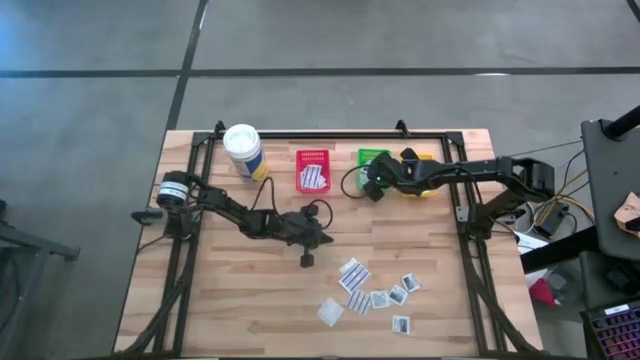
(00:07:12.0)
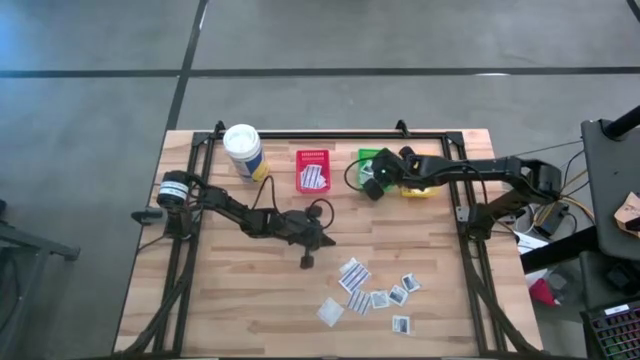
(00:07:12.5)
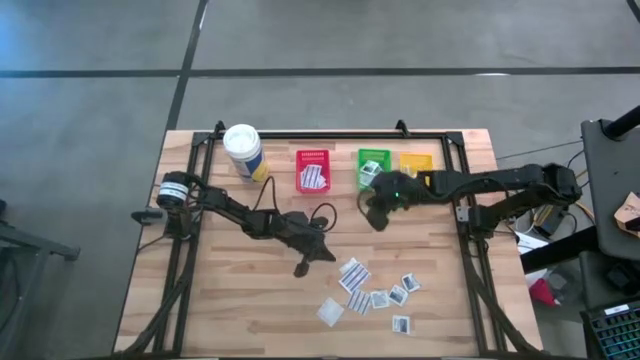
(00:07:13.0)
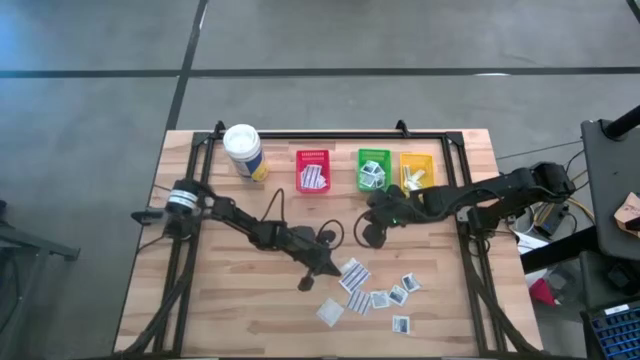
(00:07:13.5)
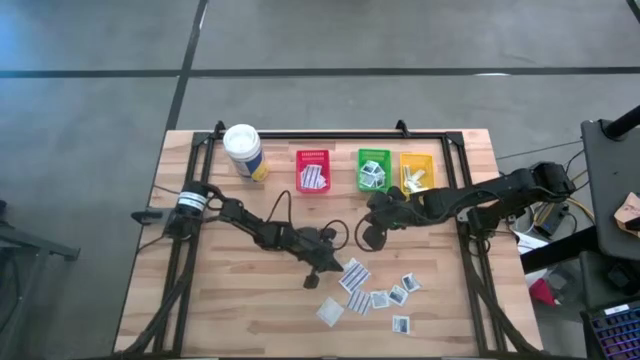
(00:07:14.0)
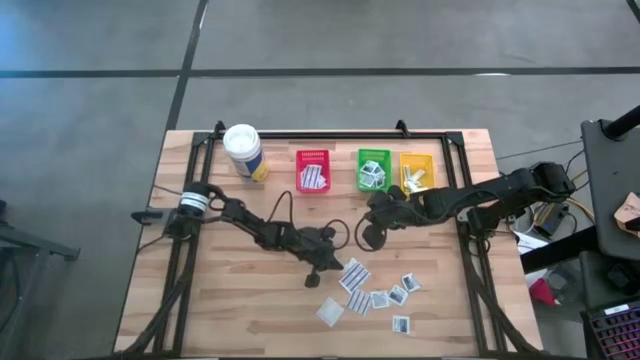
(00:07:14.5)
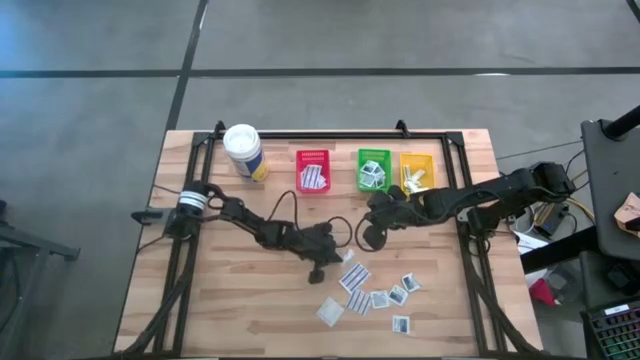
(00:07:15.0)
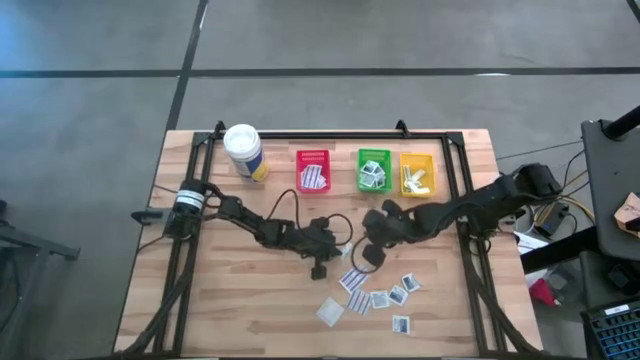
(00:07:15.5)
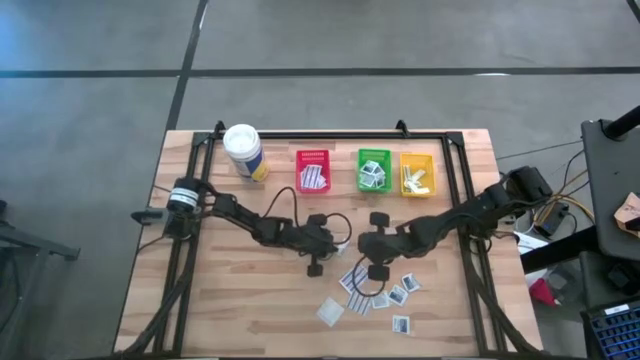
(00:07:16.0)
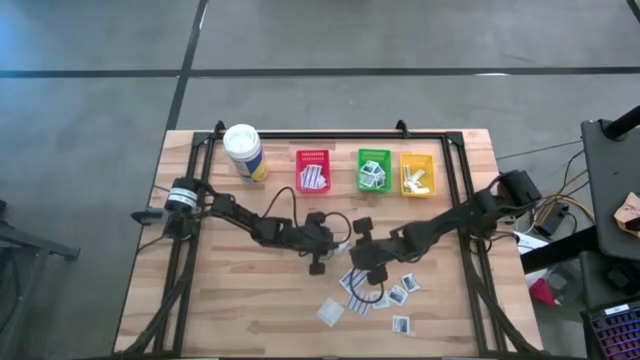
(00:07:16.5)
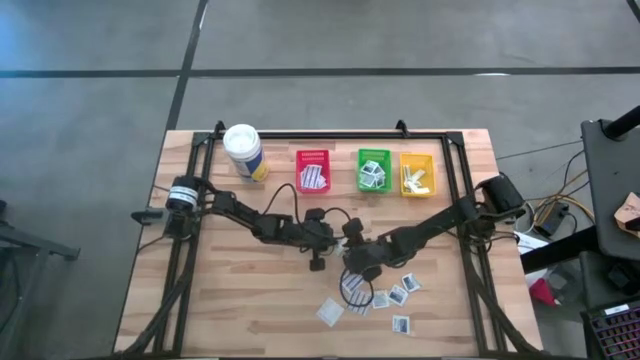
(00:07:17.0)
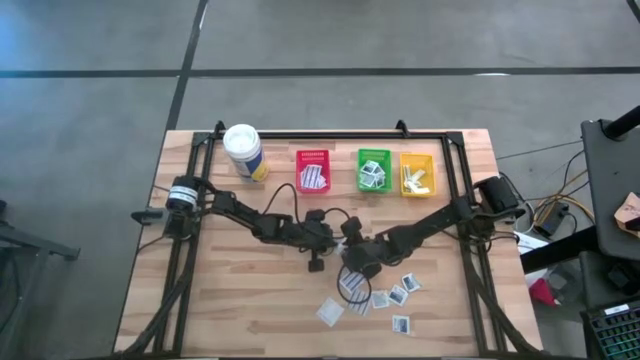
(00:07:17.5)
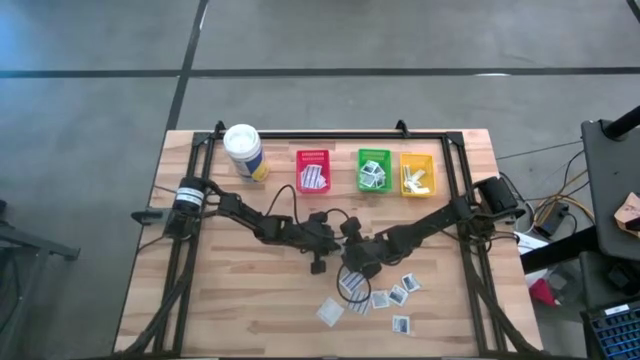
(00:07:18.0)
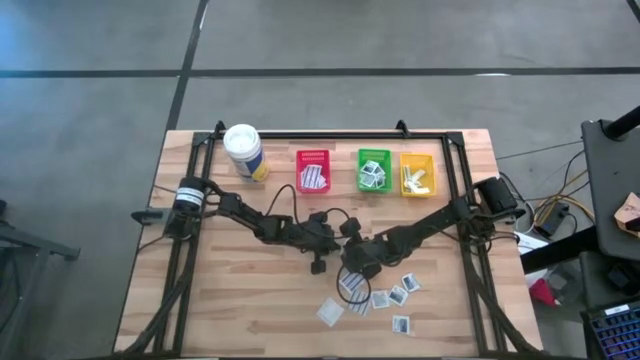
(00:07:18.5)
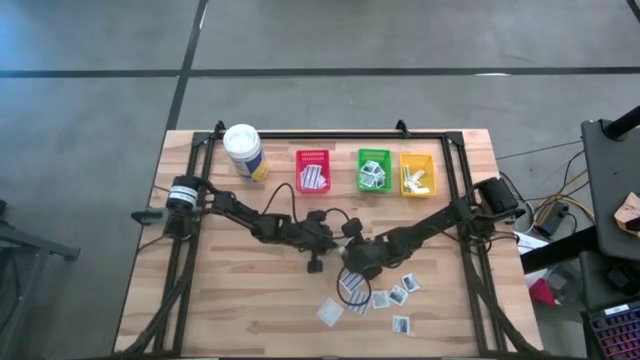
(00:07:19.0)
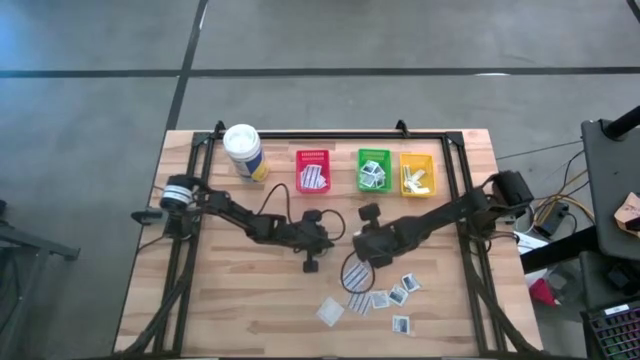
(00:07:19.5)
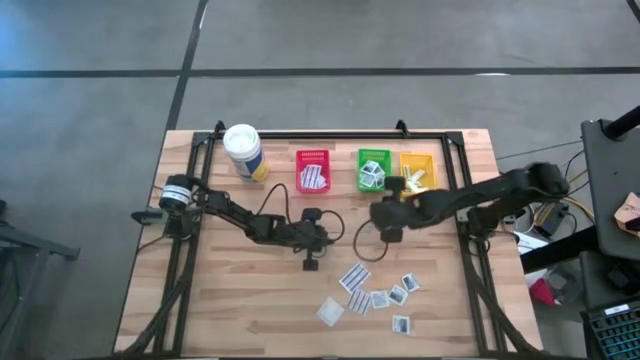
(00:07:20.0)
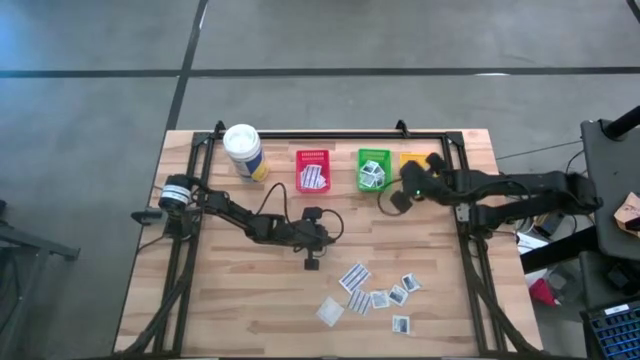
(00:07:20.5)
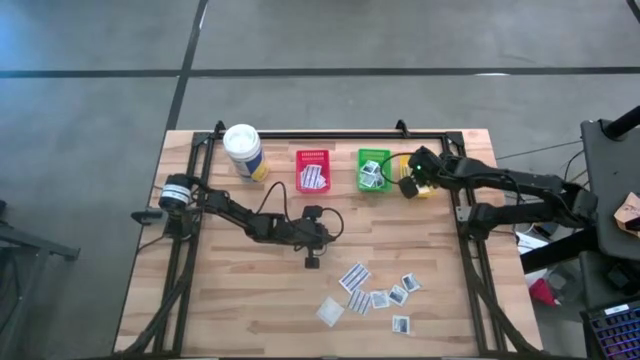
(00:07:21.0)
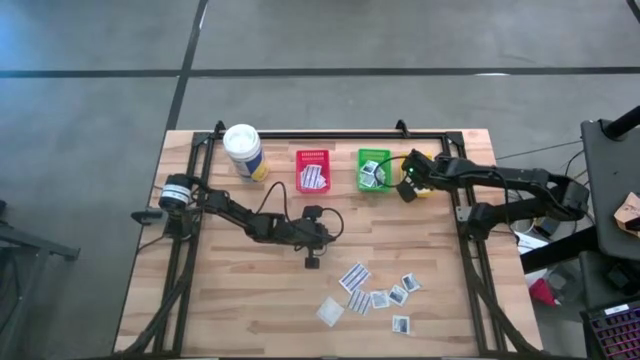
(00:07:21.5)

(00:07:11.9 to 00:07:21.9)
Task: Pick & Place First Aid Supplies
Put the green bandage in the yellow bin

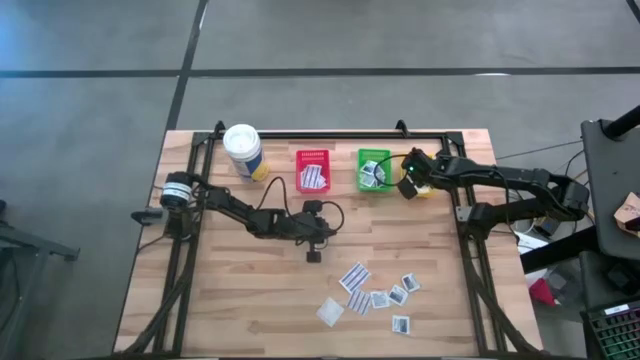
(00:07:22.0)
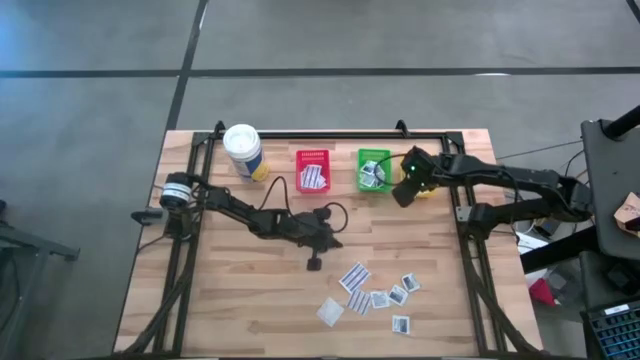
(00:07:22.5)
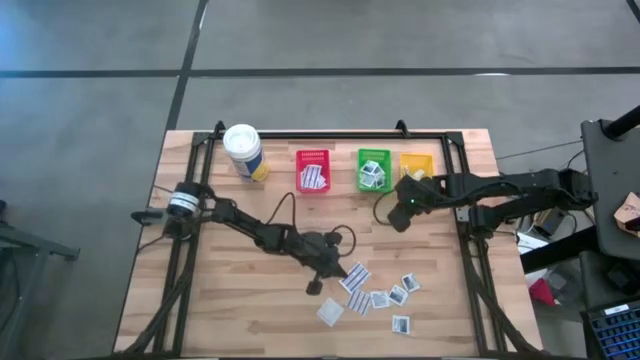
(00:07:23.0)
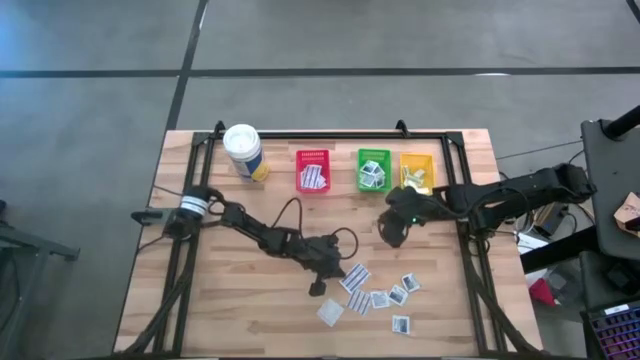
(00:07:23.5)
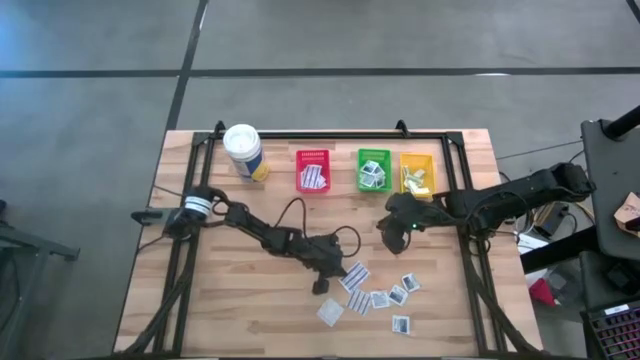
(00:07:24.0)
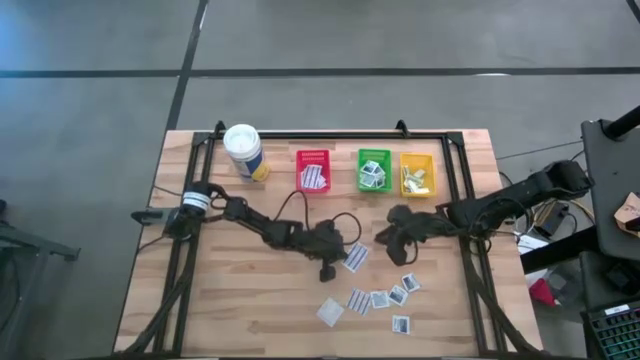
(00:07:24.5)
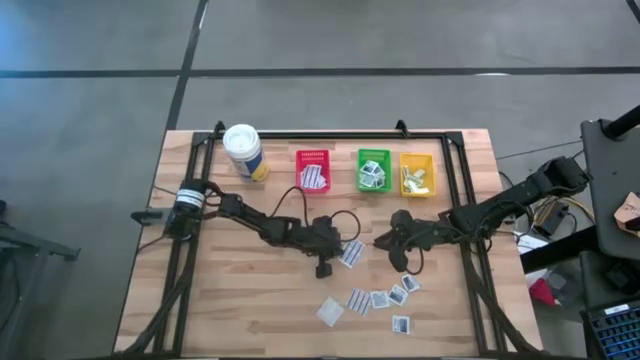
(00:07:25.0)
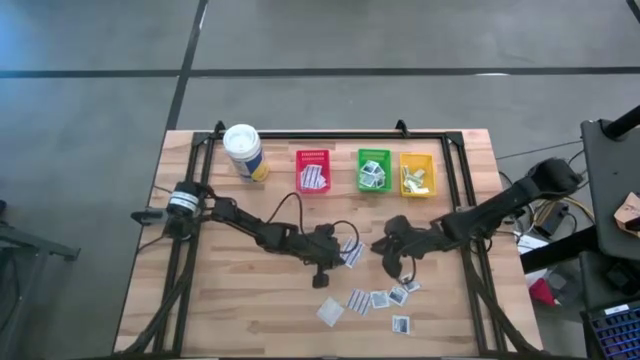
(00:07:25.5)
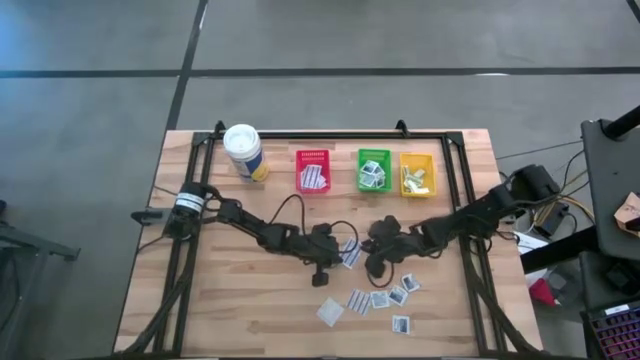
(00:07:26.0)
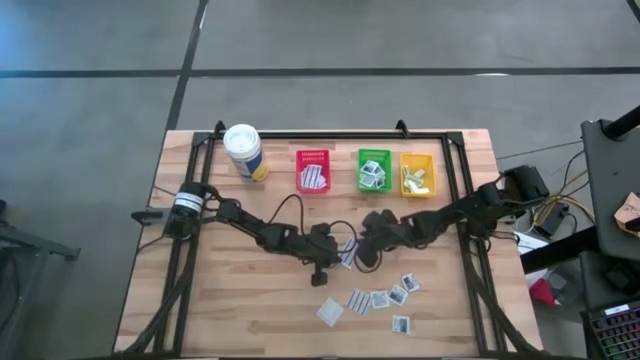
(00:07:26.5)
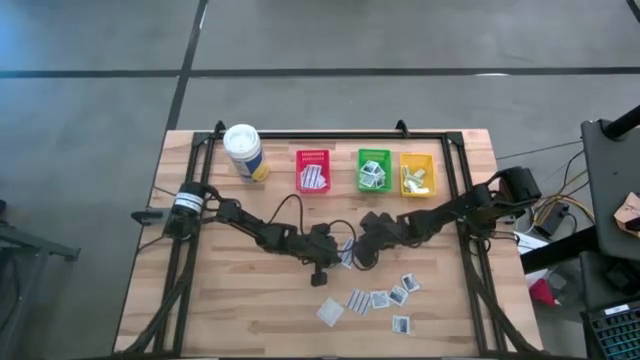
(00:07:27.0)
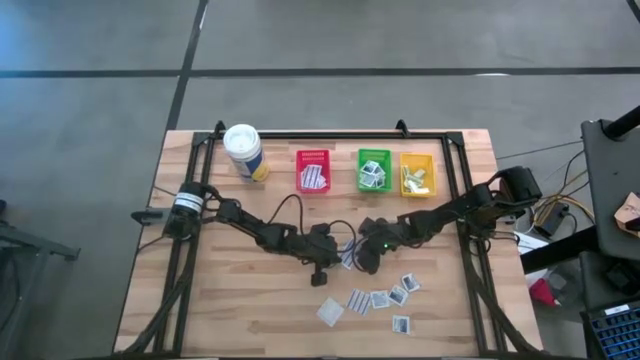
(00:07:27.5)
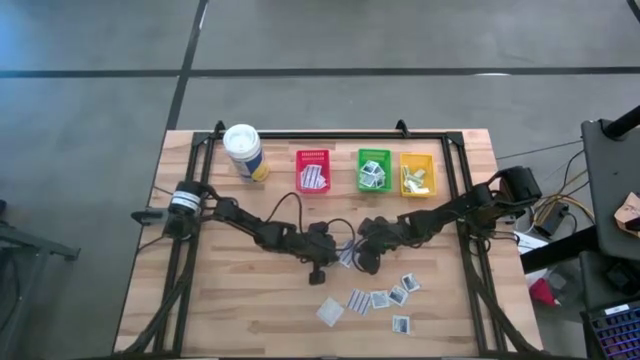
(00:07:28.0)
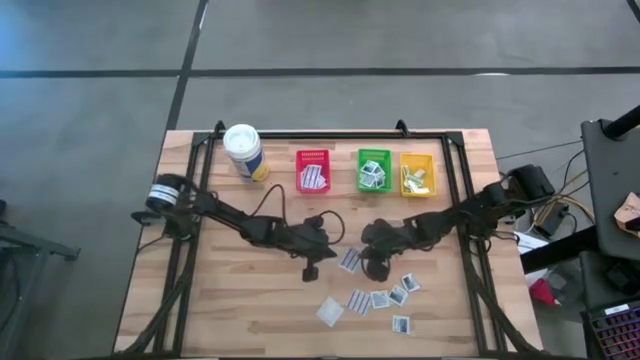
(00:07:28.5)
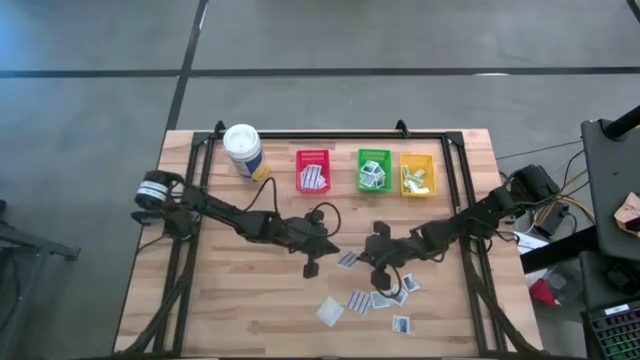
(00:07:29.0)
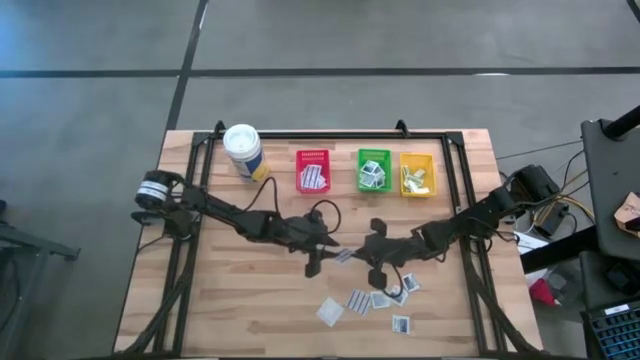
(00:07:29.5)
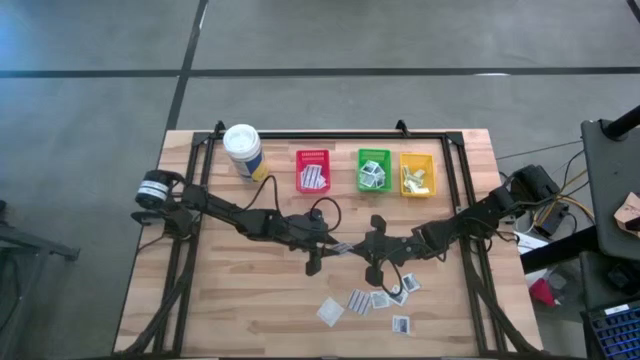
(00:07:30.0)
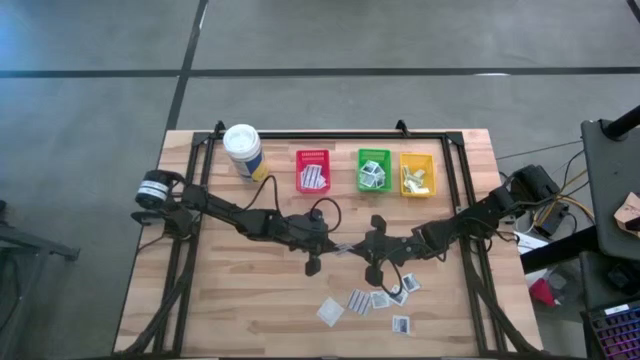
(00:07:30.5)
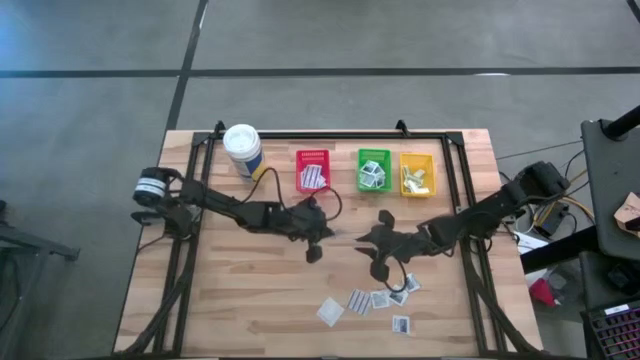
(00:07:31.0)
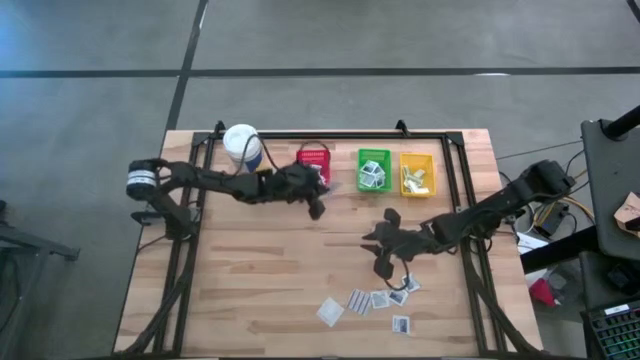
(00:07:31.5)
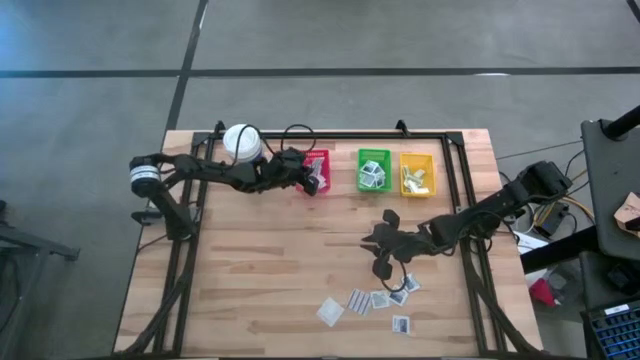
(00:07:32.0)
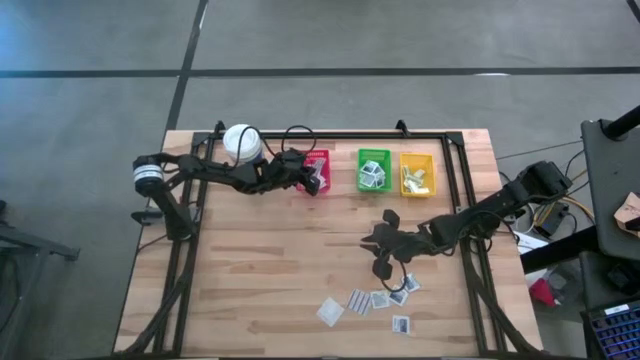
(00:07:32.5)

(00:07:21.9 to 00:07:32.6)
Put the blue bandage in the red bin
